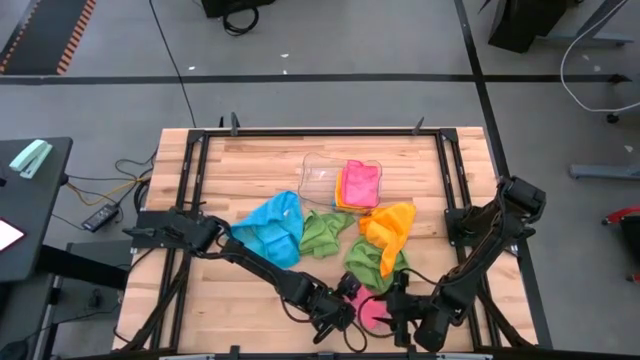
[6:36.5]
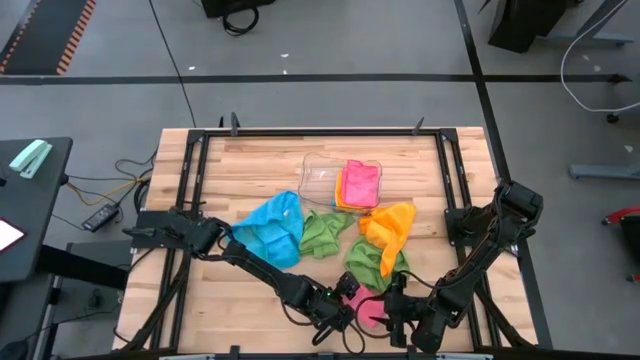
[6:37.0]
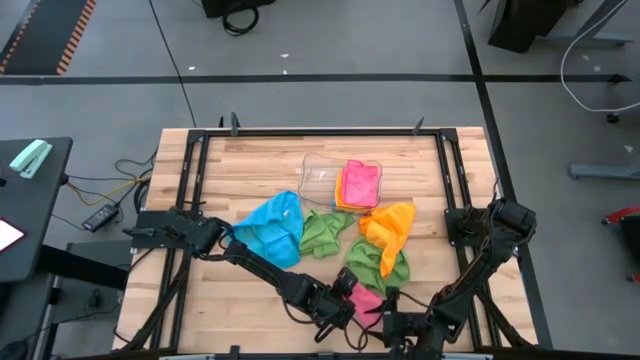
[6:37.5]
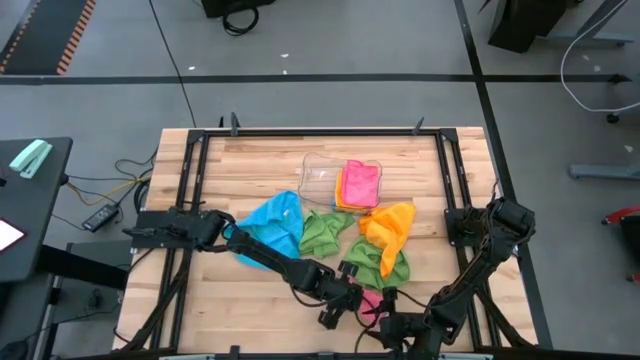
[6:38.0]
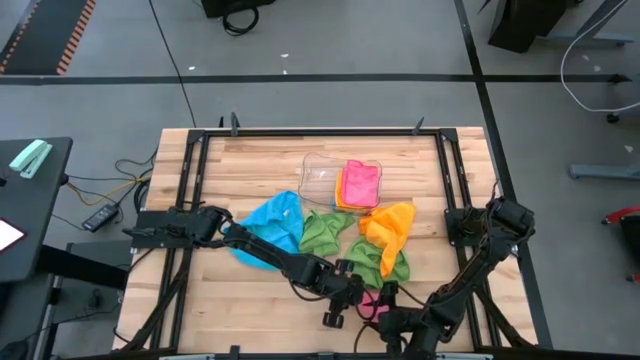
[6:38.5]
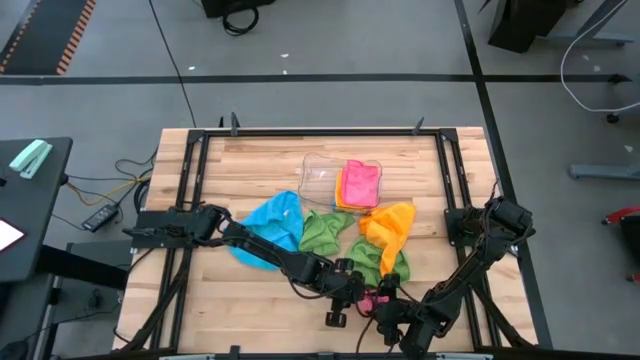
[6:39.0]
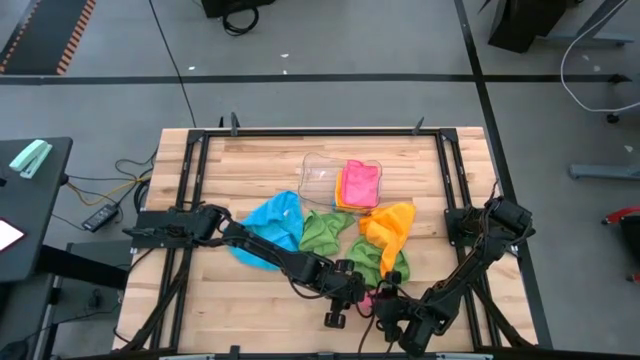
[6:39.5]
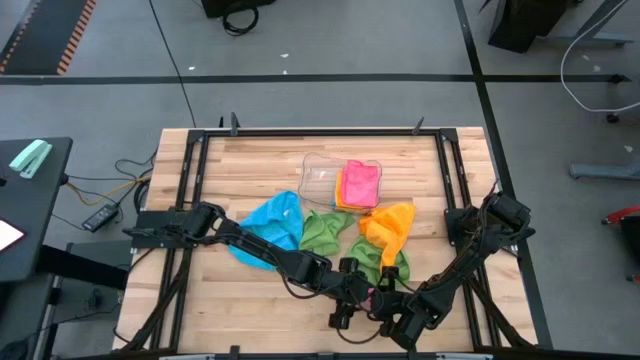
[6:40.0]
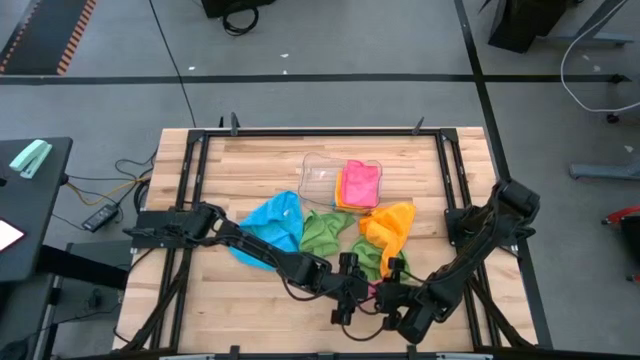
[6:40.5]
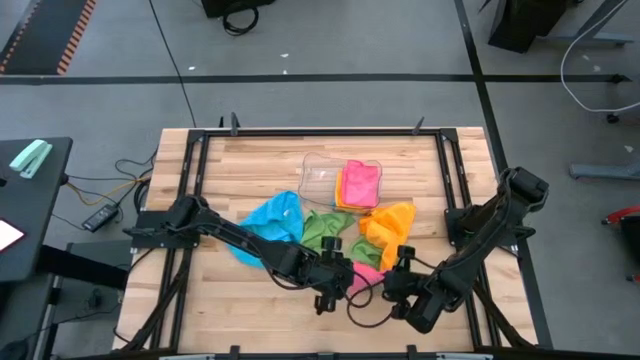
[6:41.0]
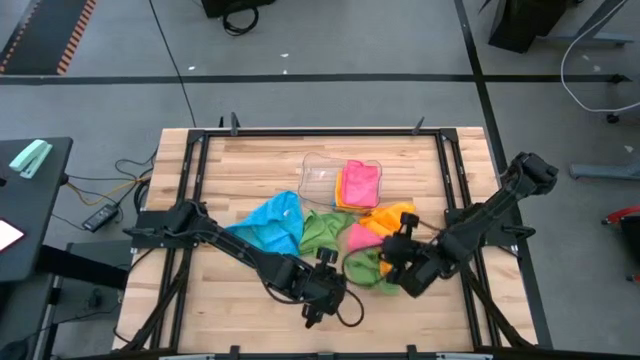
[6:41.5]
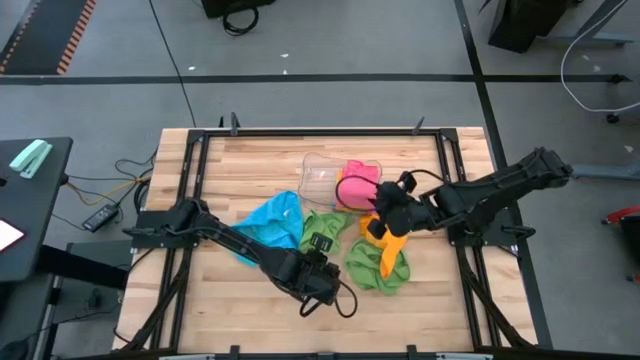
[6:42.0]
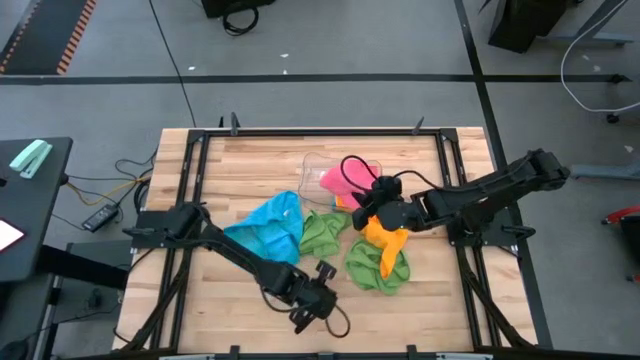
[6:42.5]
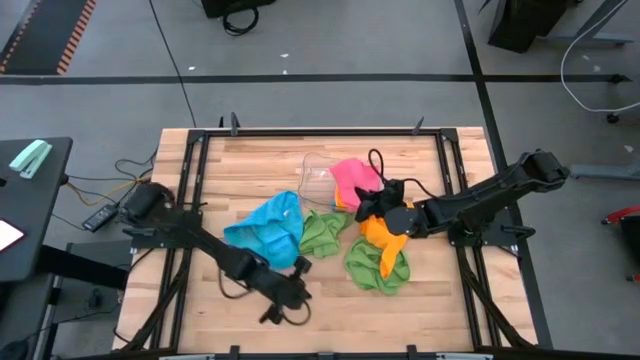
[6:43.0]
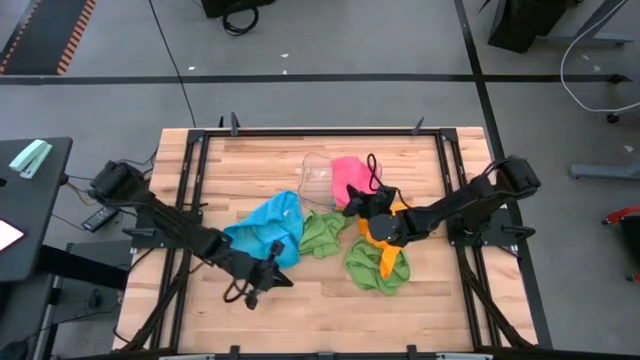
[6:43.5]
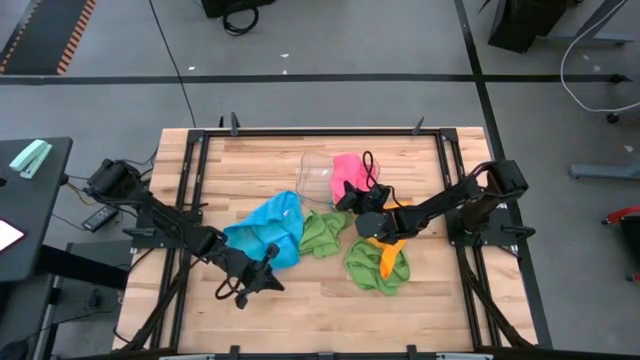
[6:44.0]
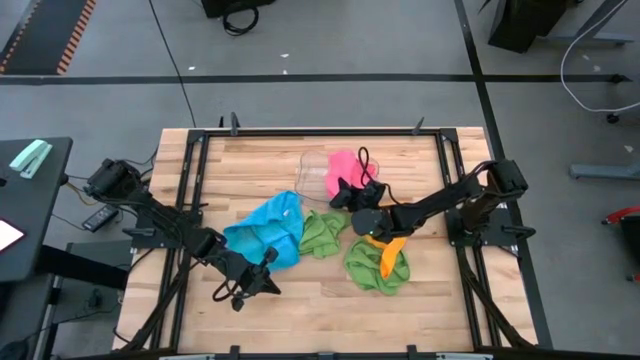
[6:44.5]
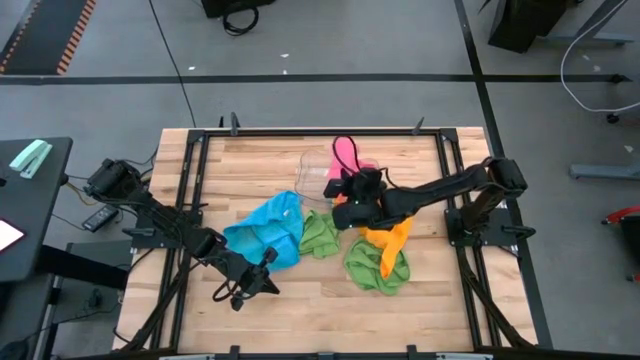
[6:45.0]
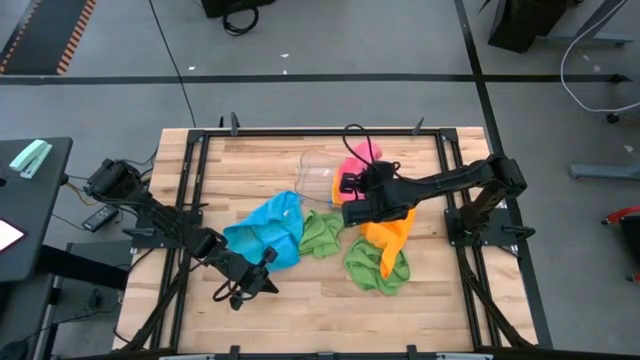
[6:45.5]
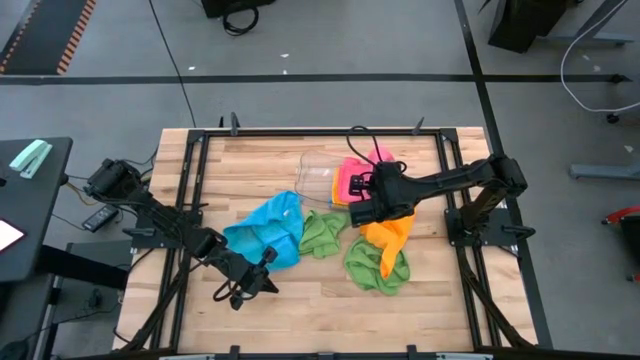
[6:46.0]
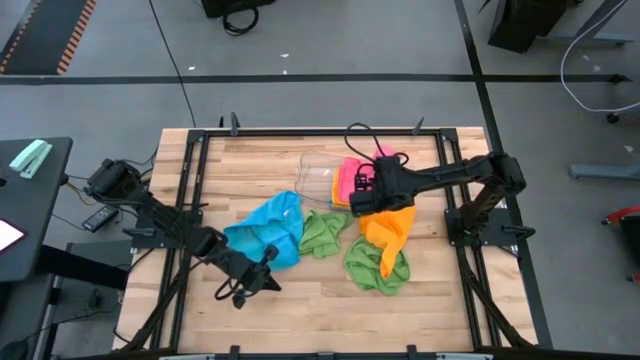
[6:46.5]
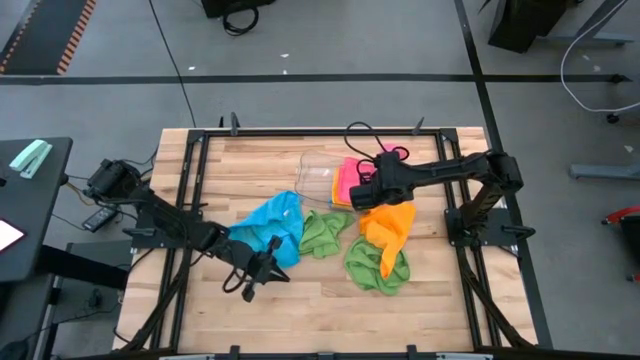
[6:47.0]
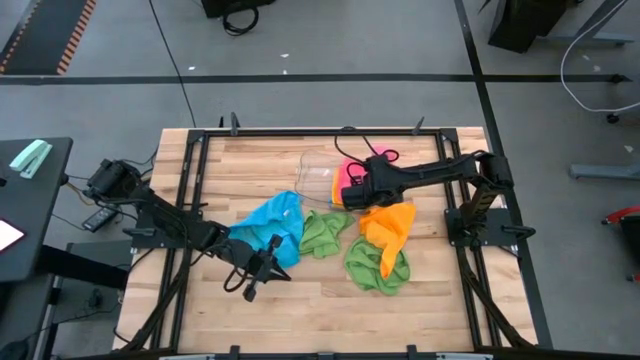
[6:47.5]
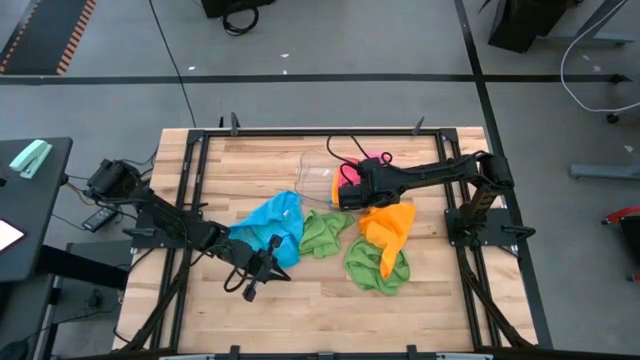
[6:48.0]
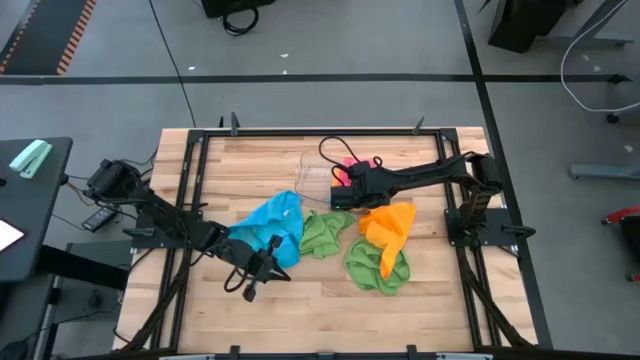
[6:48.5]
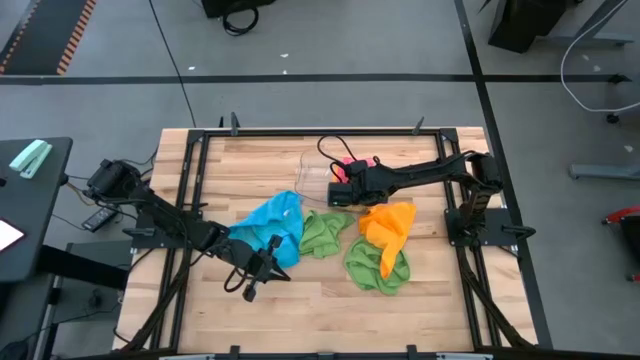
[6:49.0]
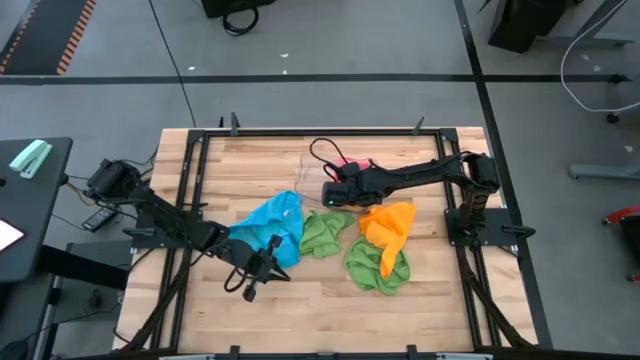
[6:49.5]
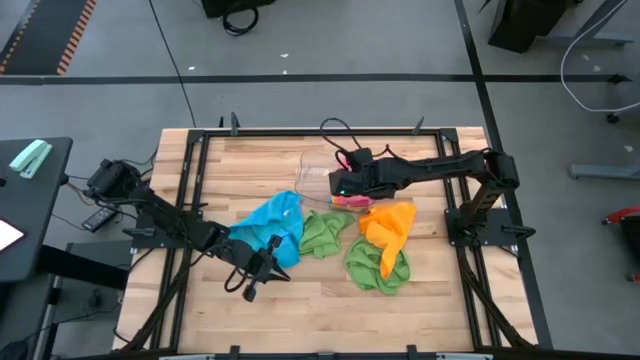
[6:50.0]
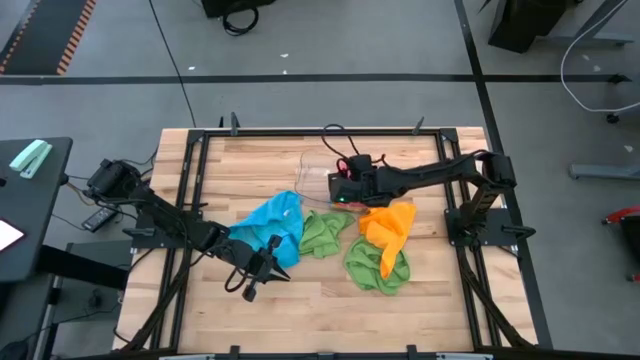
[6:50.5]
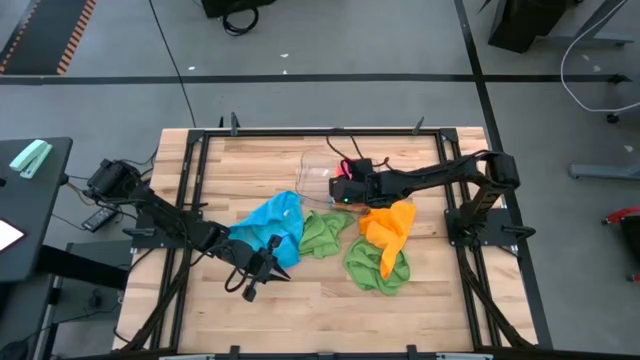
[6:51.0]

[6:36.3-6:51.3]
Task: Fold microfiber towels
Put the folded pink microfiber cloth into the transparent bin

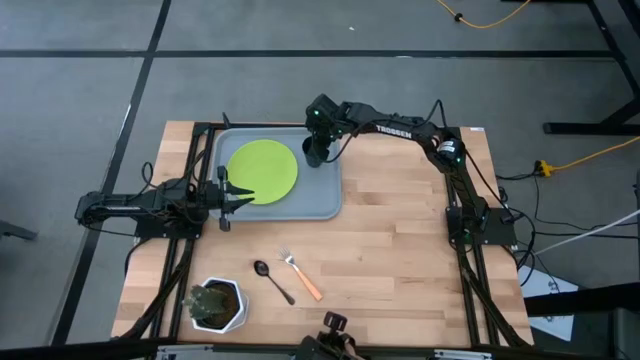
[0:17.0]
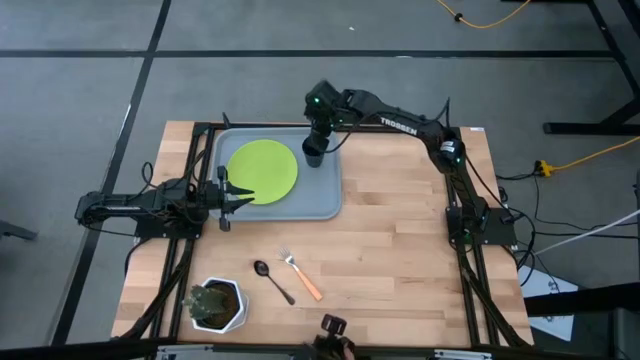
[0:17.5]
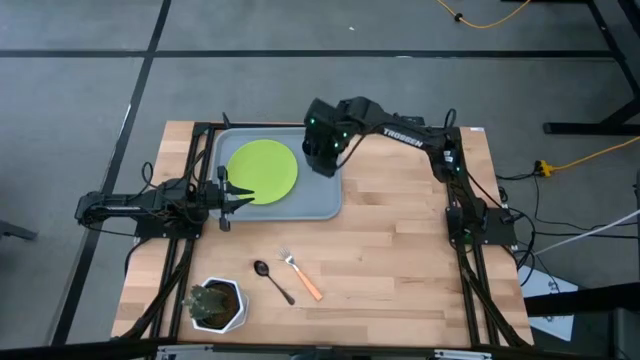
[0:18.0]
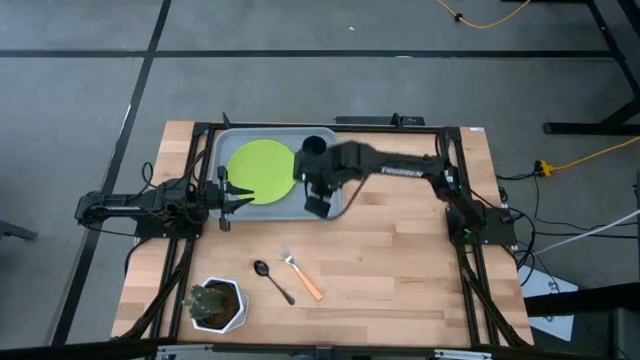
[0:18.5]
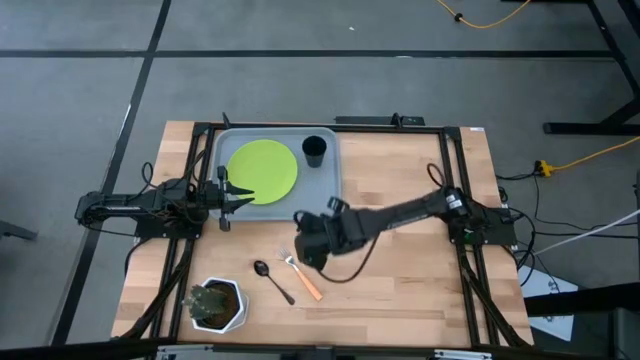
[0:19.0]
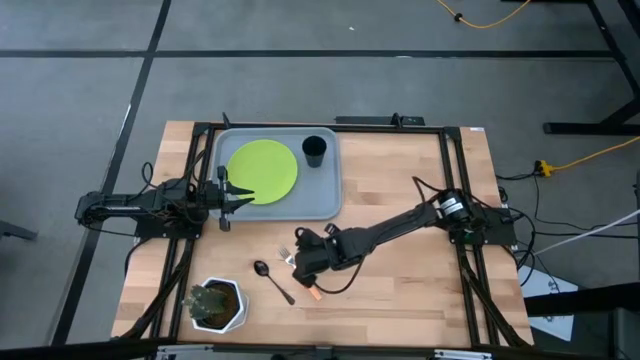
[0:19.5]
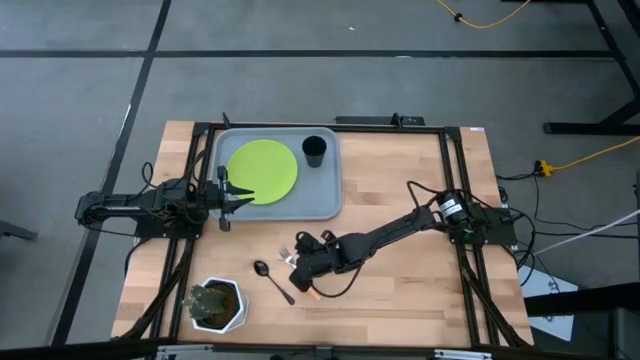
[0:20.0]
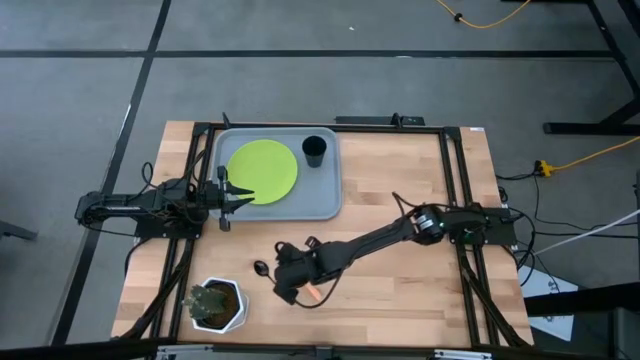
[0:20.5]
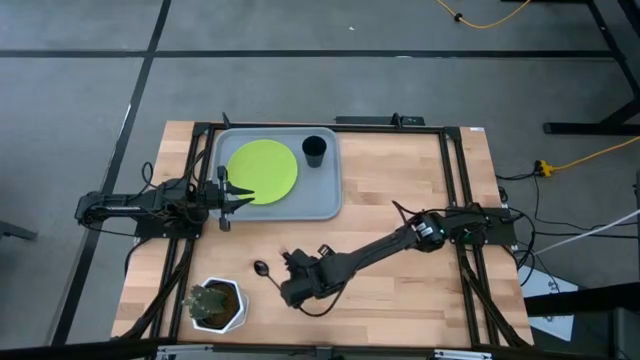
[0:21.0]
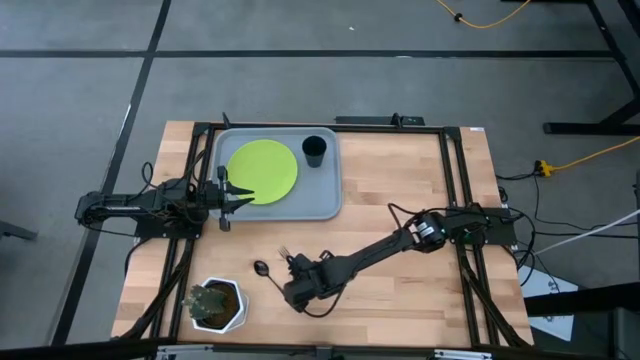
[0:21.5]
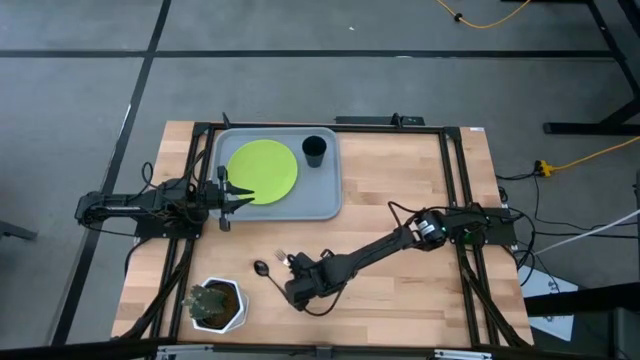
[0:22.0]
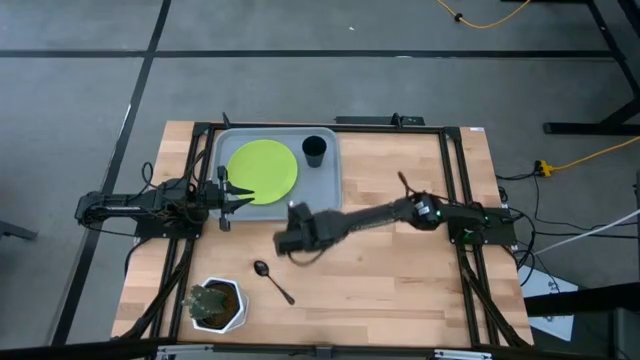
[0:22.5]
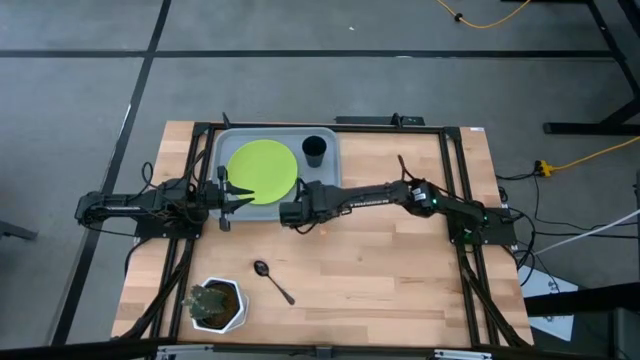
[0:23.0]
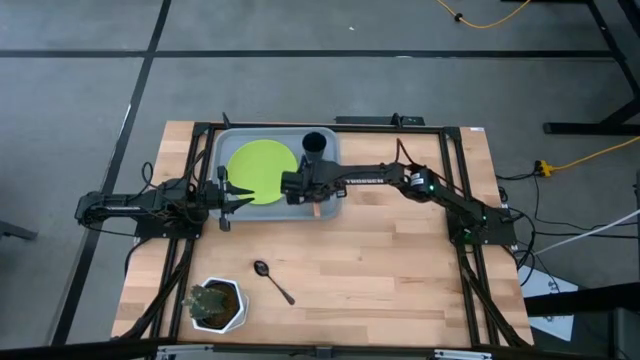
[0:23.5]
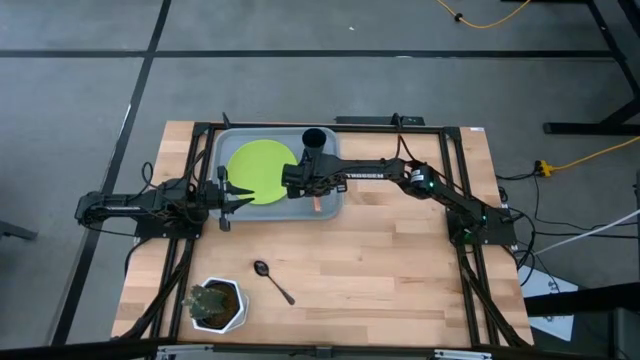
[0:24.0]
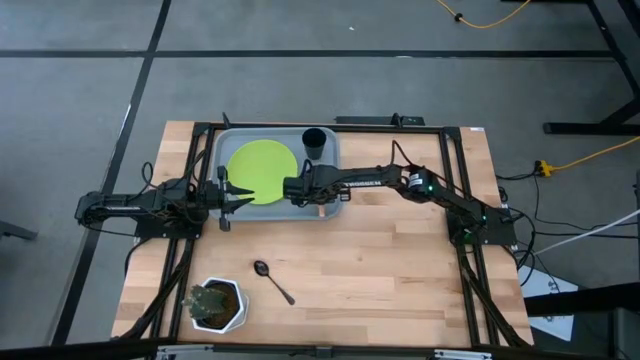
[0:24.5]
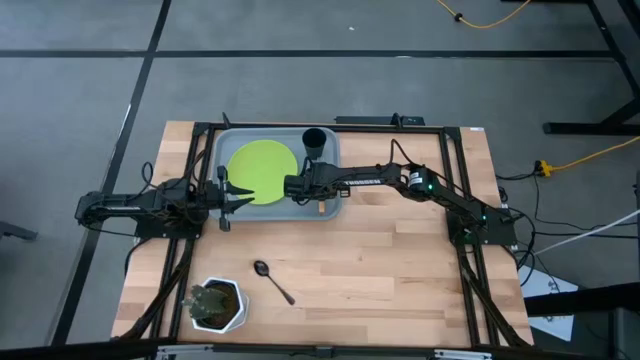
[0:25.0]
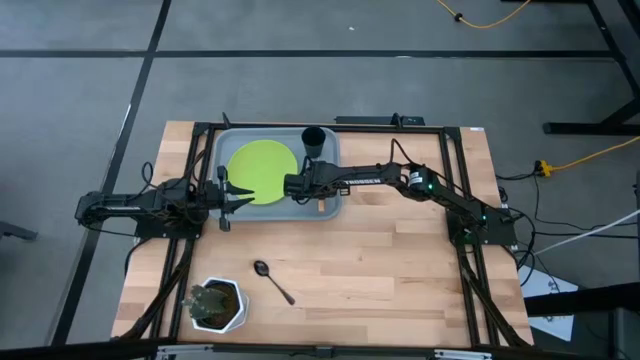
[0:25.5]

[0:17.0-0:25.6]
Task: Pick and place plate/cup/fork/spoon on tray
Put the orange fork on the blue serving tray to the right of the green plate
